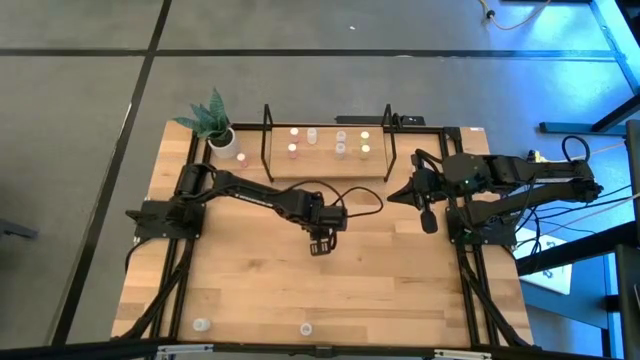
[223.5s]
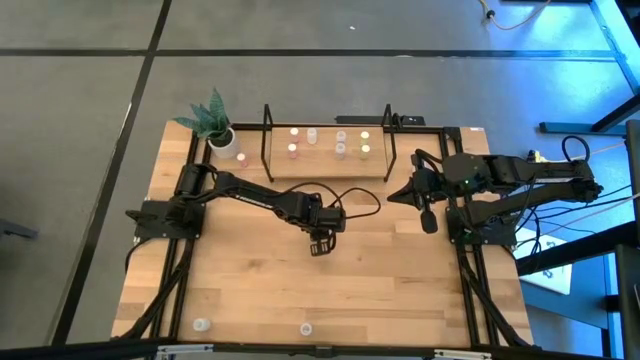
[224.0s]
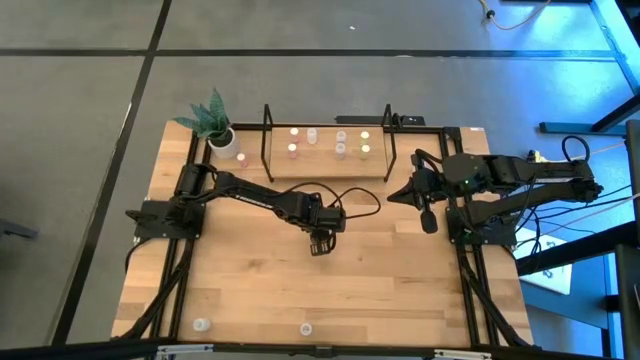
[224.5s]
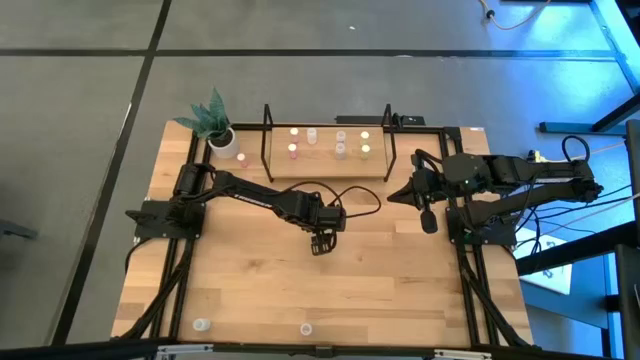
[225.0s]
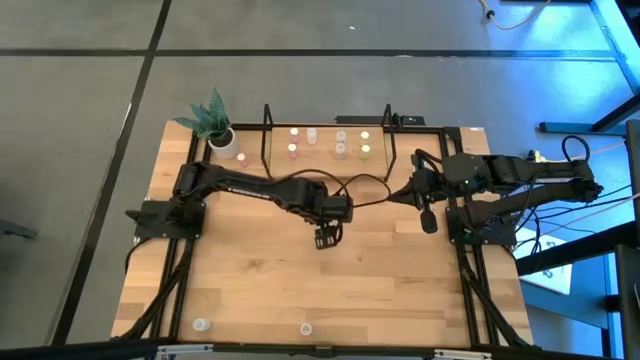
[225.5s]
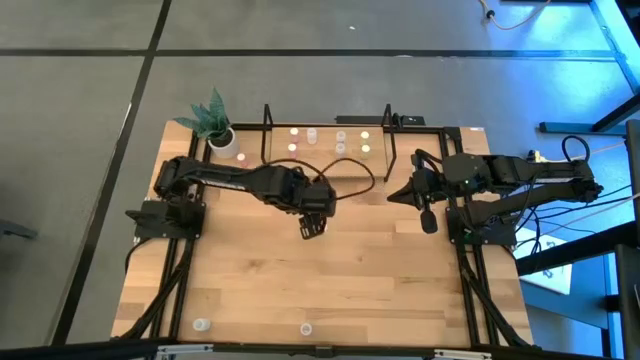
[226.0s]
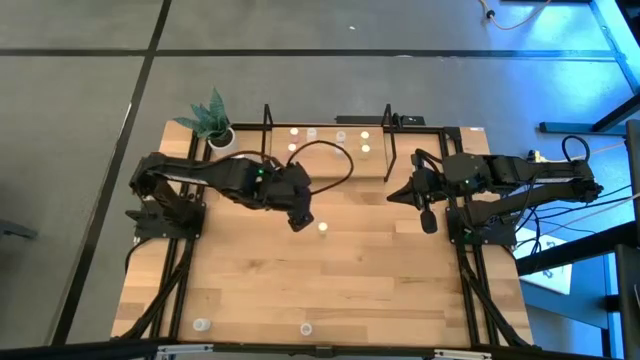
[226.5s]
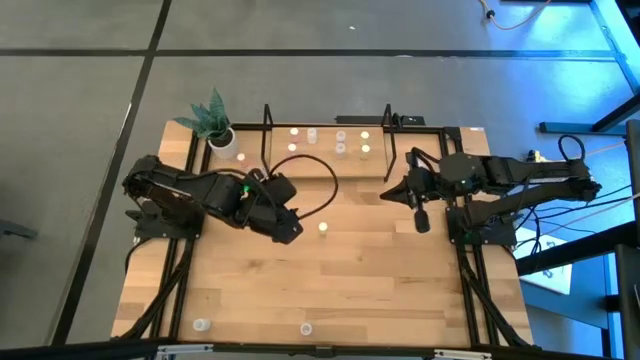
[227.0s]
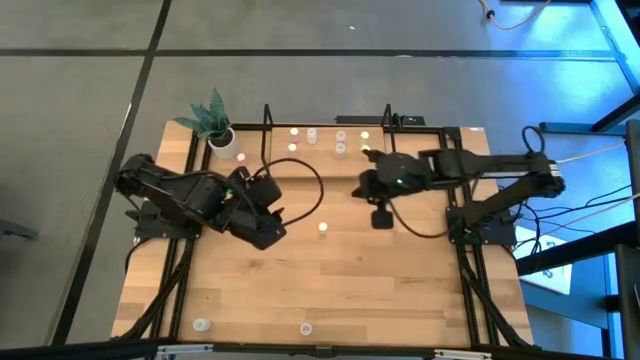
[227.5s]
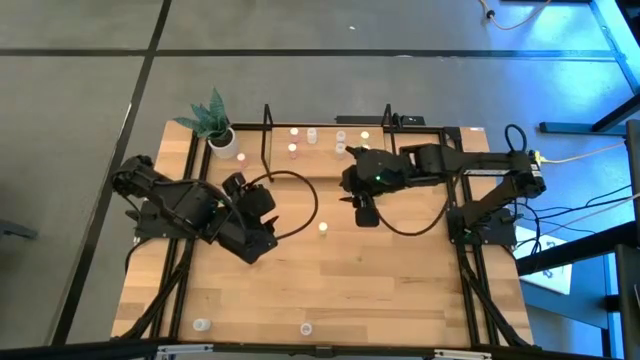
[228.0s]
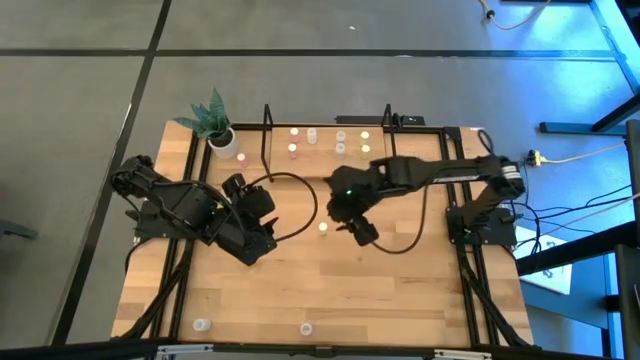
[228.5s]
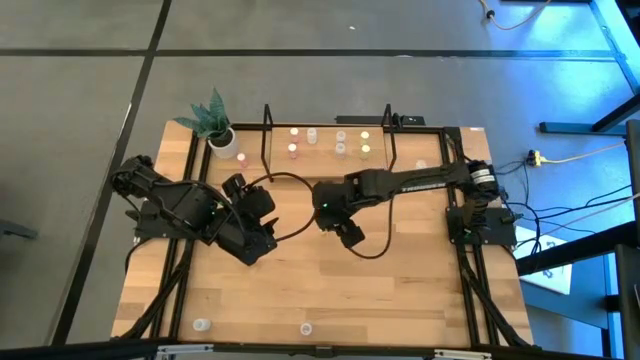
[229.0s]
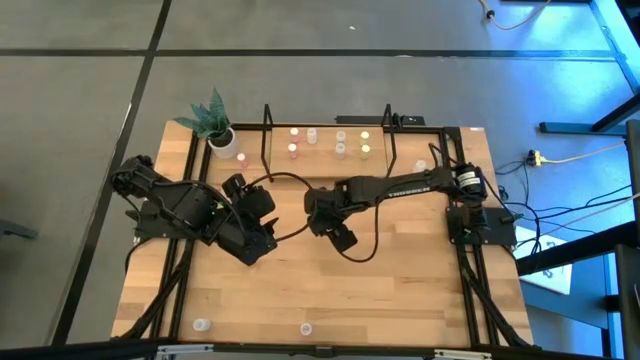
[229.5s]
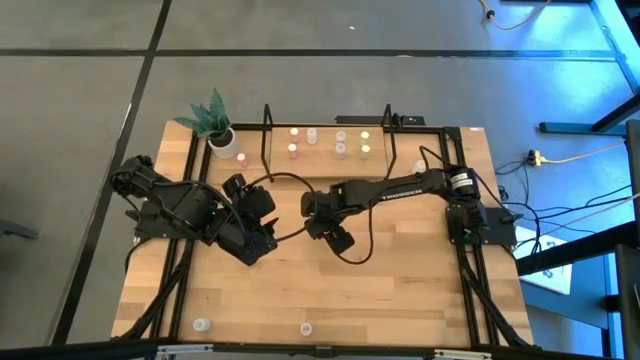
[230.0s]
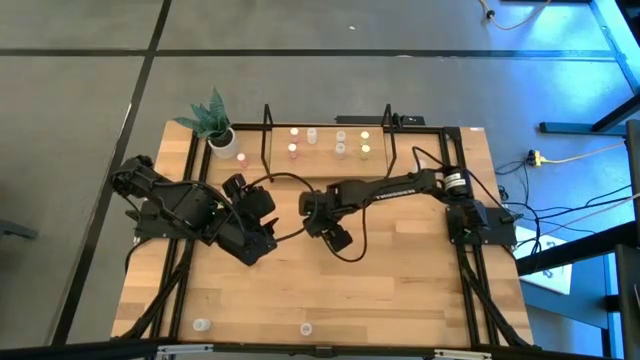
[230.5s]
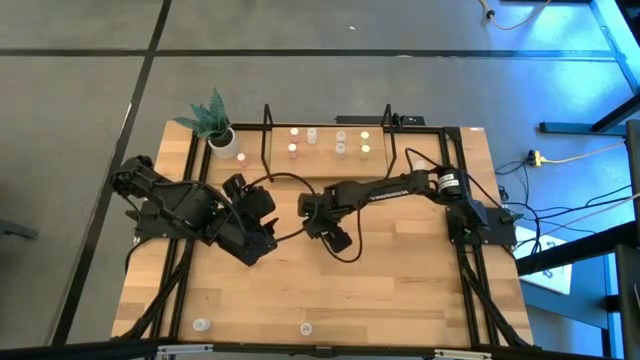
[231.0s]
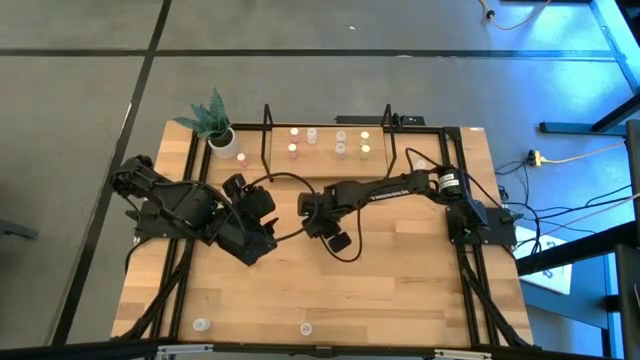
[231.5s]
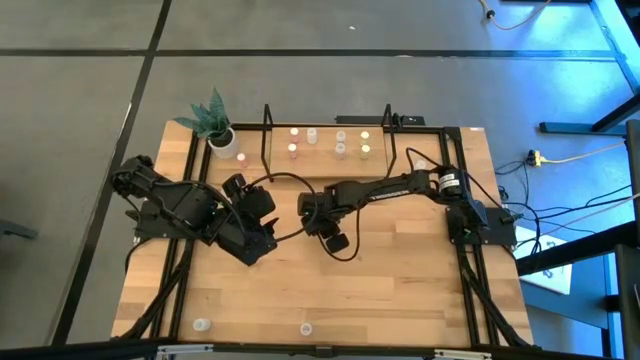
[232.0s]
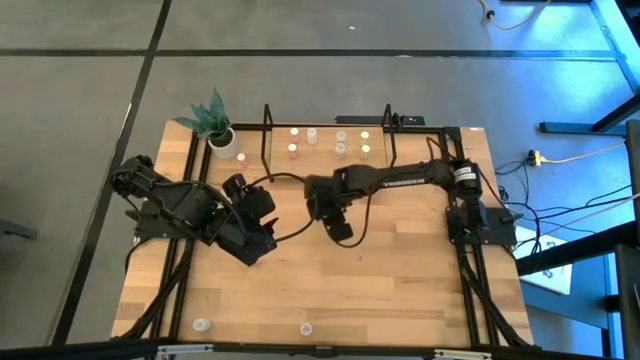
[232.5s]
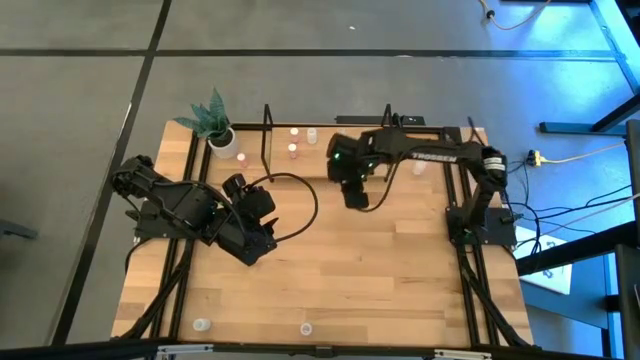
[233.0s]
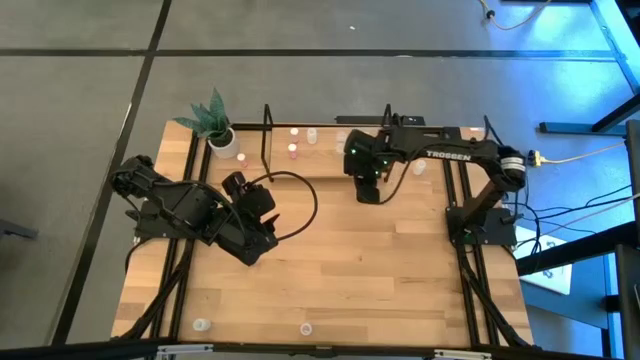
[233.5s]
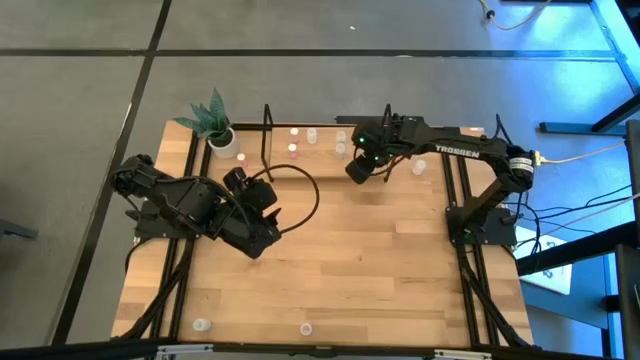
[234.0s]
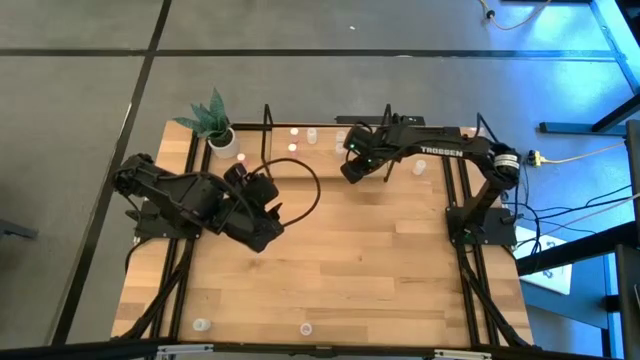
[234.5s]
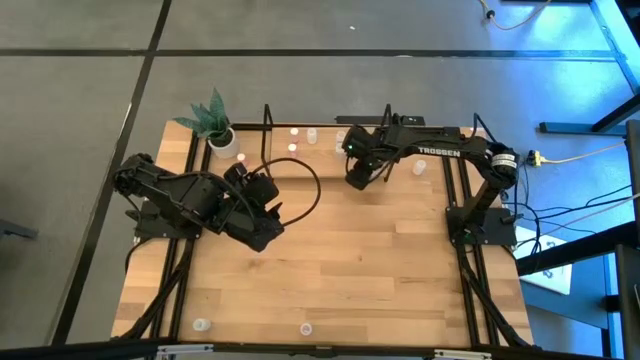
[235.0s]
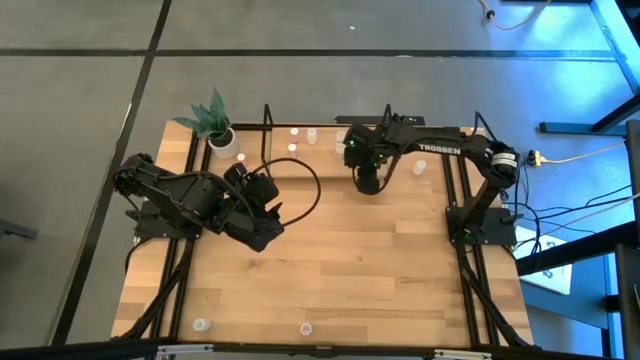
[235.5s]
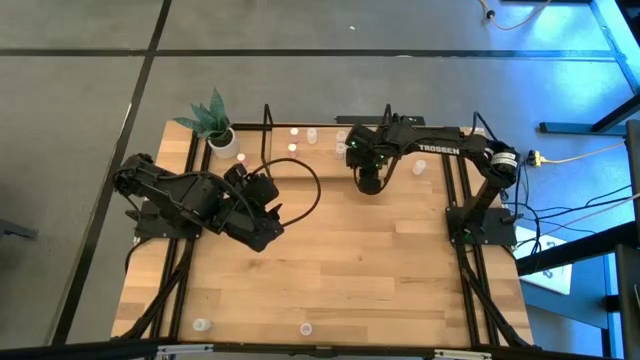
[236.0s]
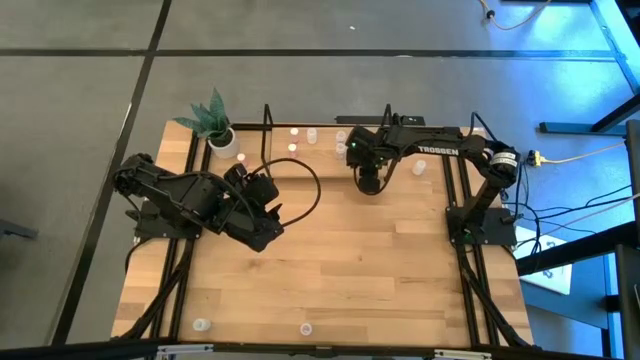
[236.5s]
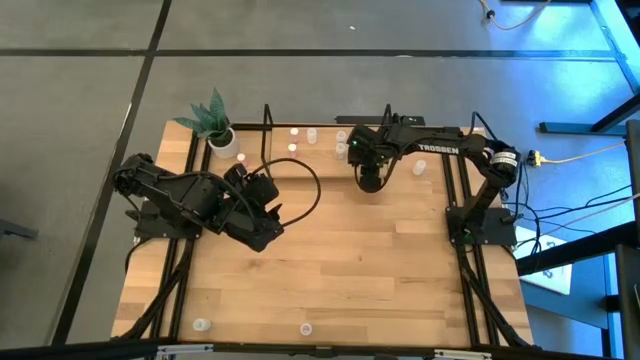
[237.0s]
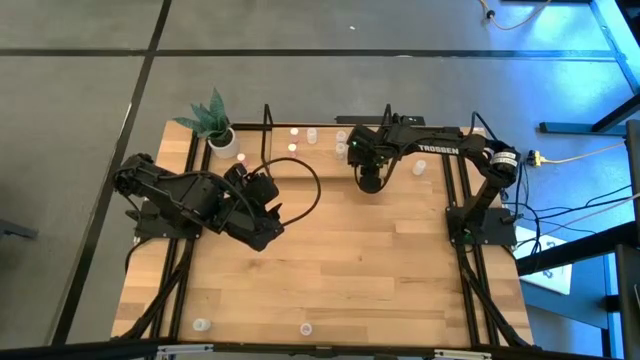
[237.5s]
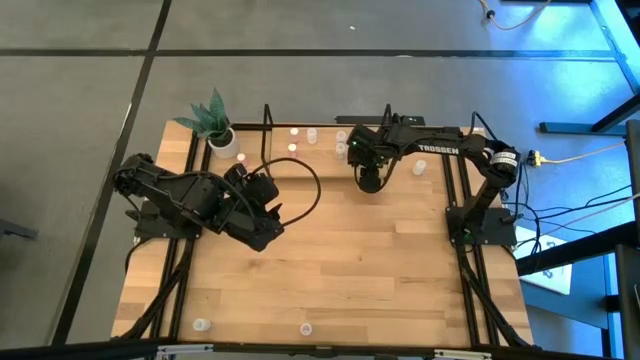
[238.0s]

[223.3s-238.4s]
Task: Pick and place medicine bottles onto shelf by color
Put the yellow pill bottle on the shelf aligned with the other yellow pill bottles

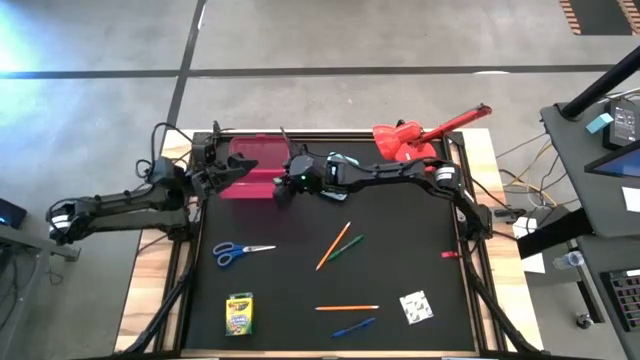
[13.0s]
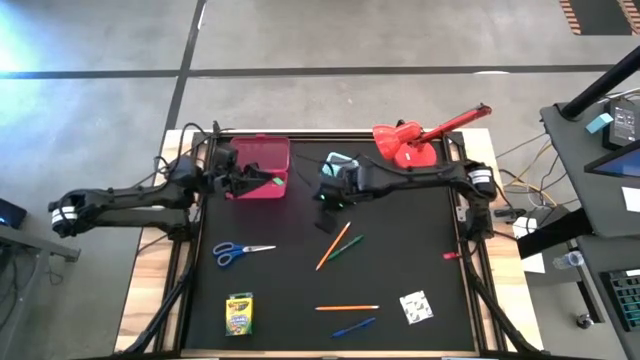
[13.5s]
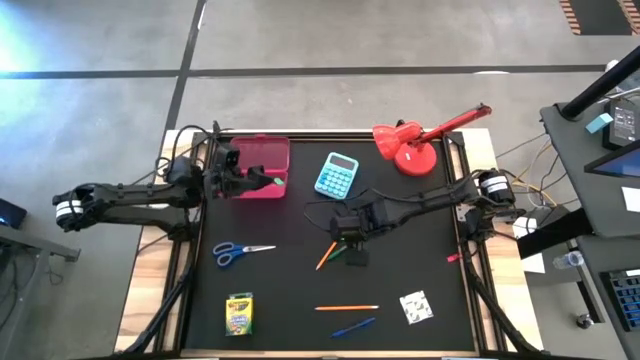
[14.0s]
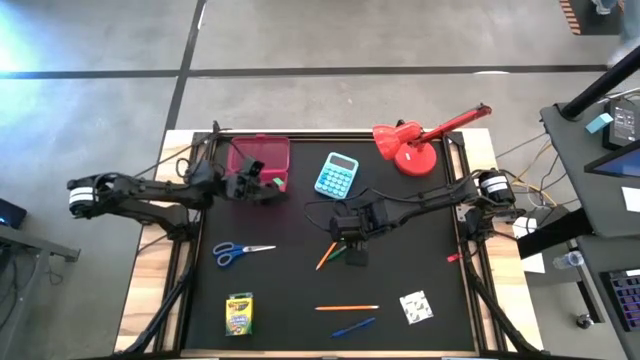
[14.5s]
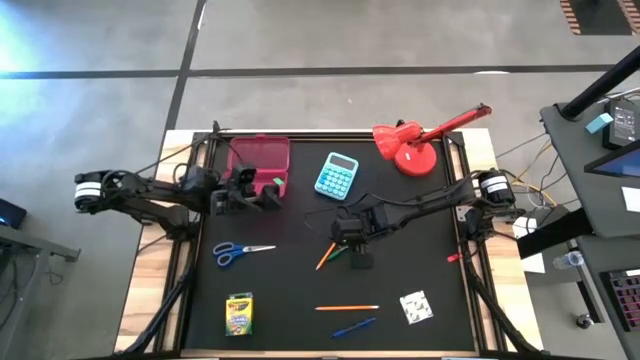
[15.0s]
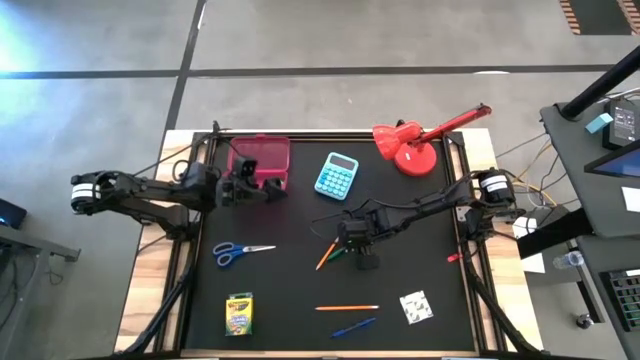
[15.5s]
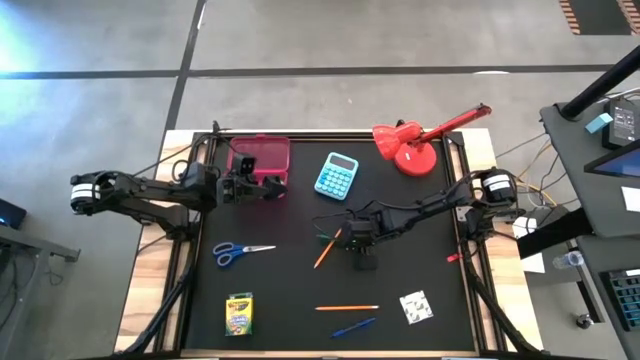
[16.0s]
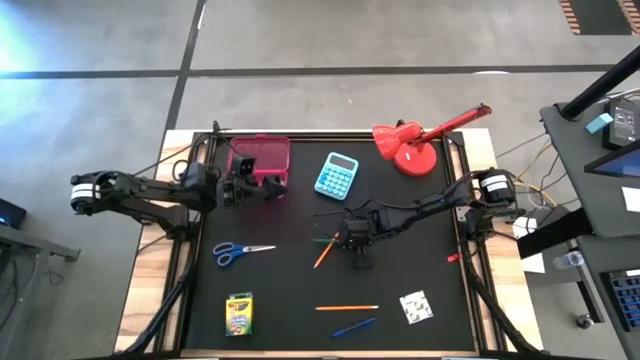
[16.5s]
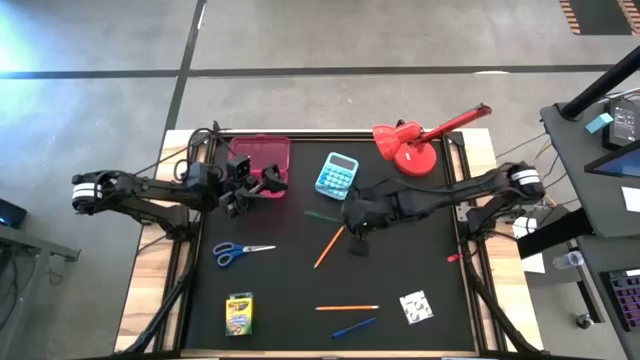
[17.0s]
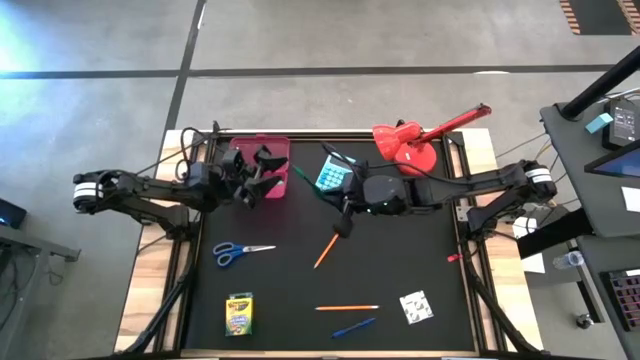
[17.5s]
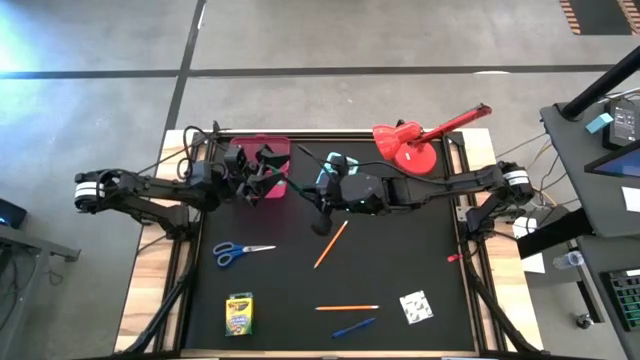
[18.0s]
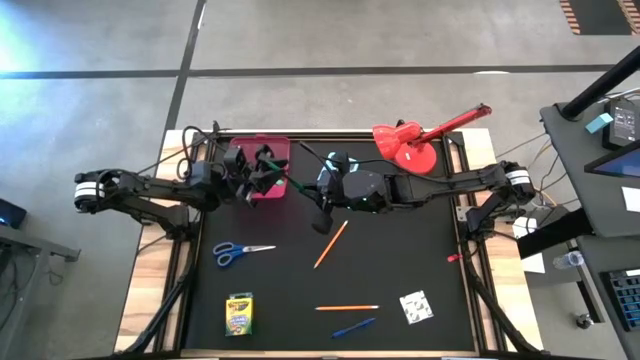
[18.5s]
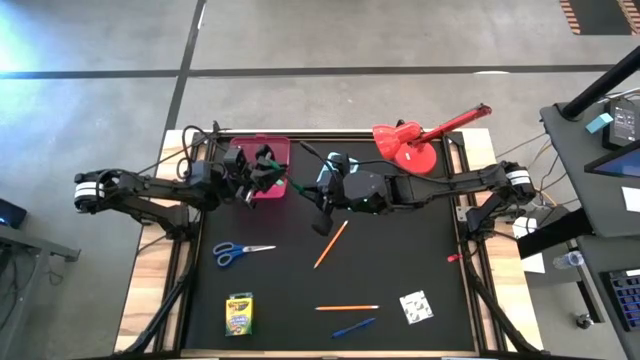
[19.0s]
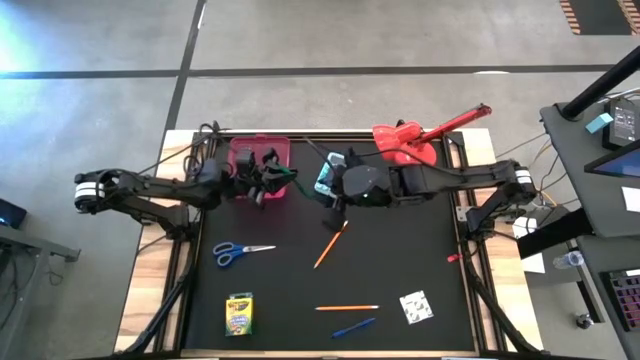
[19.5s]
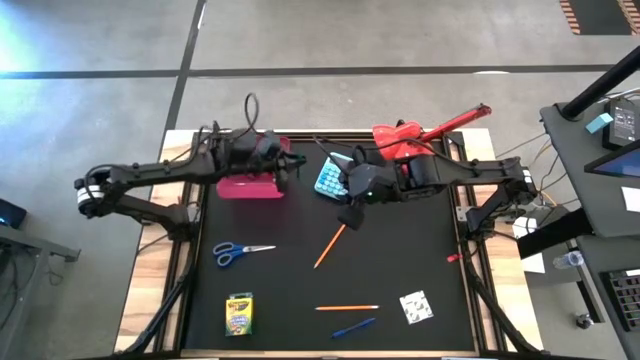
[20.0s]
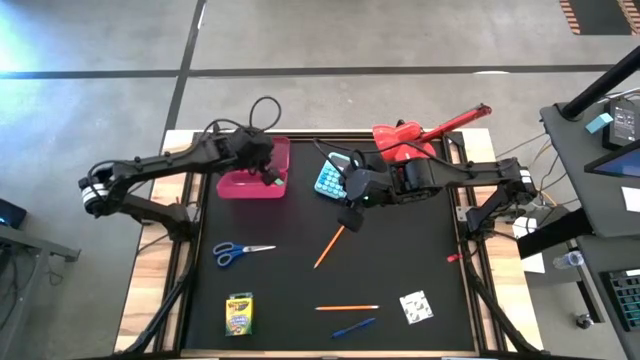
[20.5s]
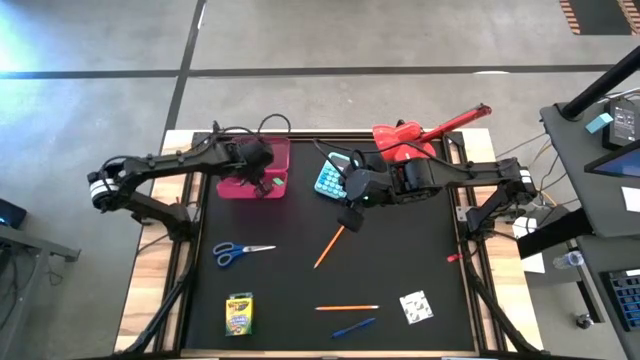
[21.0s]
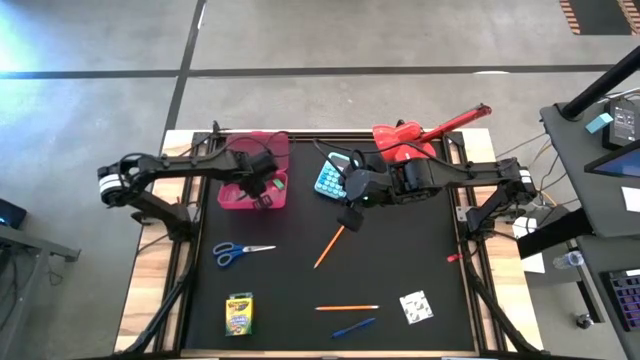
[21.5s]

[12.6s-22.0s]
Task: Pack school essentials
Put the green pen into the red supply box
